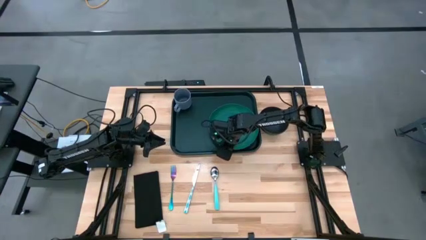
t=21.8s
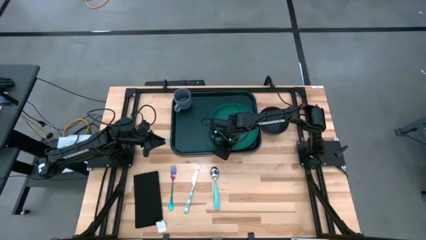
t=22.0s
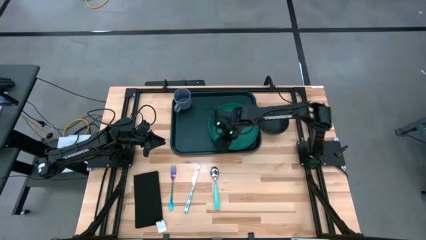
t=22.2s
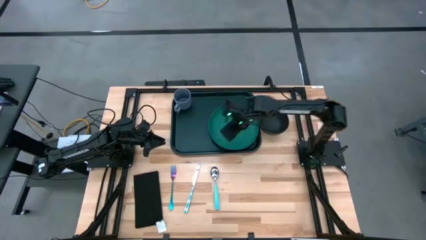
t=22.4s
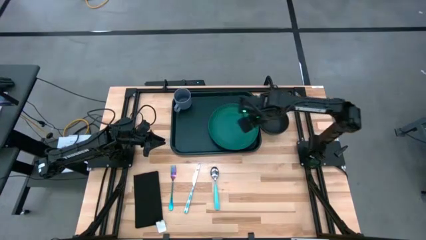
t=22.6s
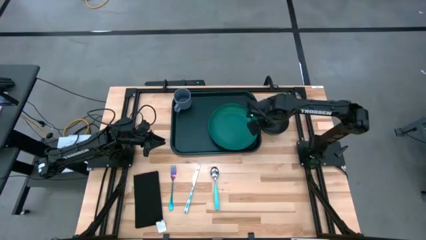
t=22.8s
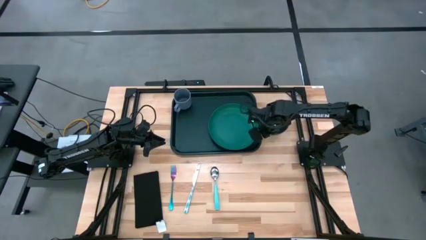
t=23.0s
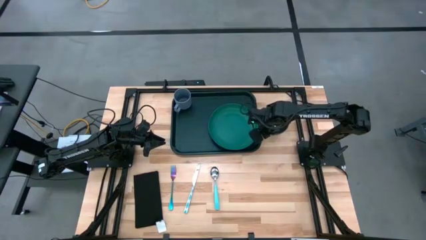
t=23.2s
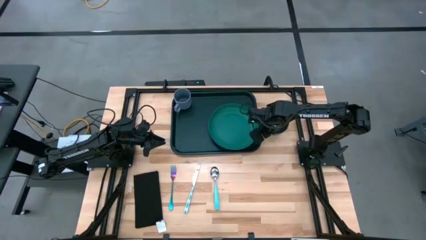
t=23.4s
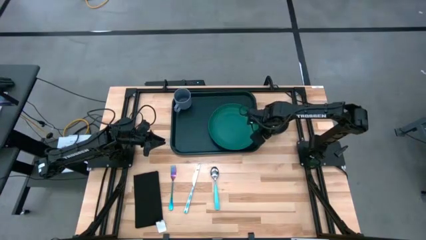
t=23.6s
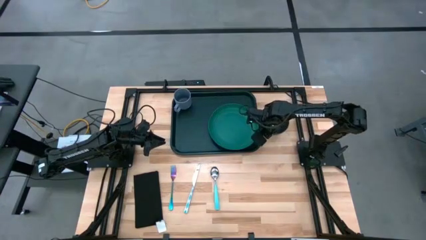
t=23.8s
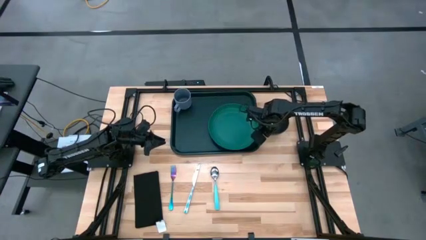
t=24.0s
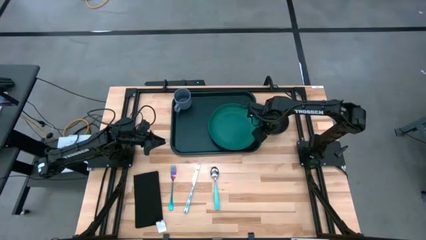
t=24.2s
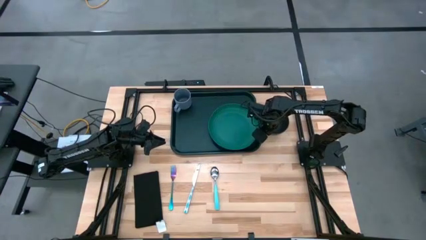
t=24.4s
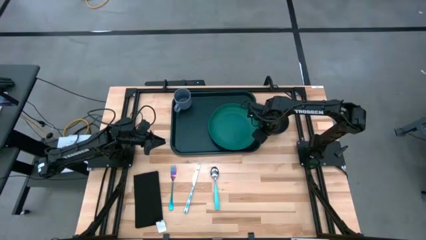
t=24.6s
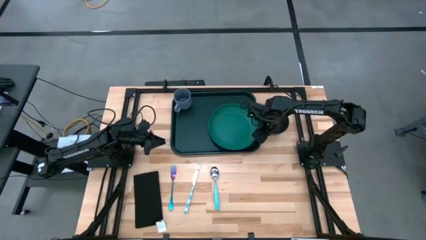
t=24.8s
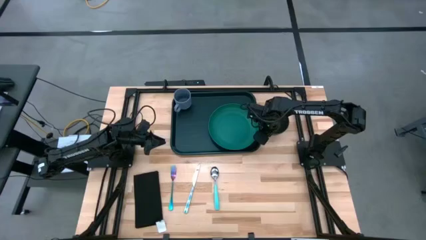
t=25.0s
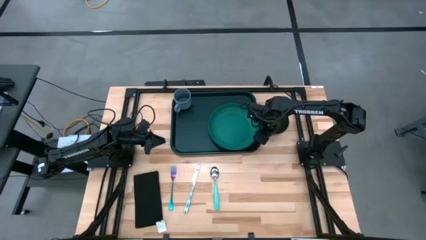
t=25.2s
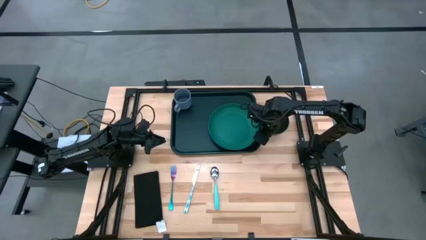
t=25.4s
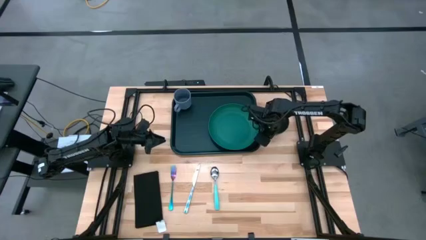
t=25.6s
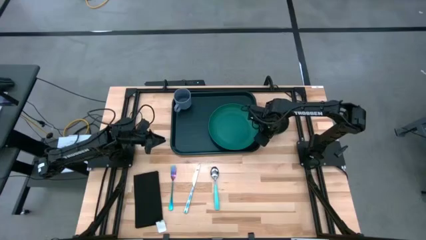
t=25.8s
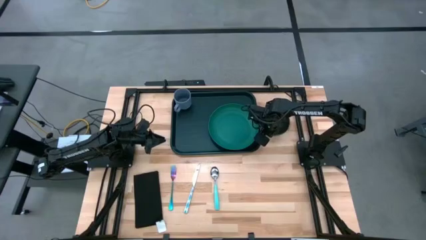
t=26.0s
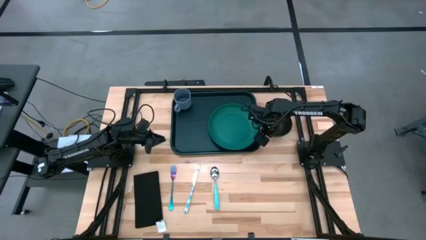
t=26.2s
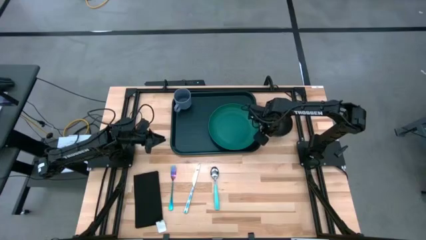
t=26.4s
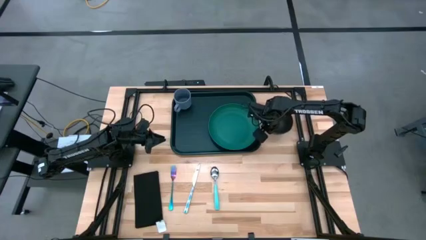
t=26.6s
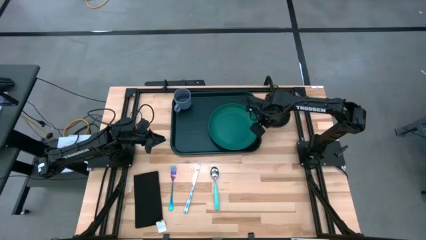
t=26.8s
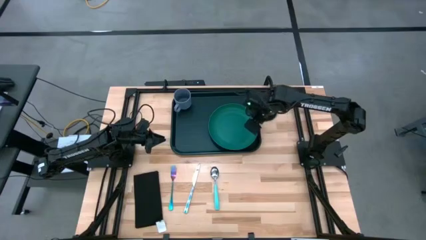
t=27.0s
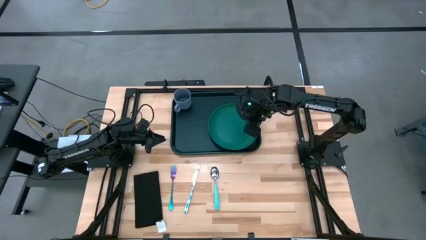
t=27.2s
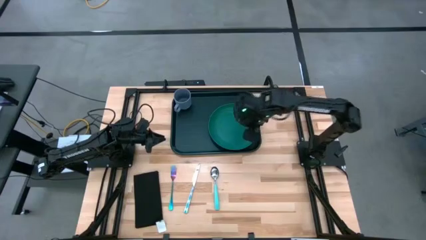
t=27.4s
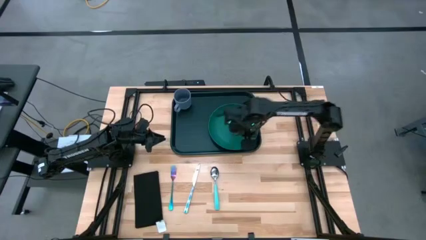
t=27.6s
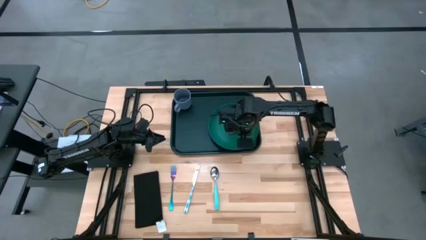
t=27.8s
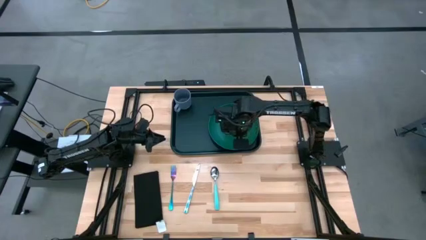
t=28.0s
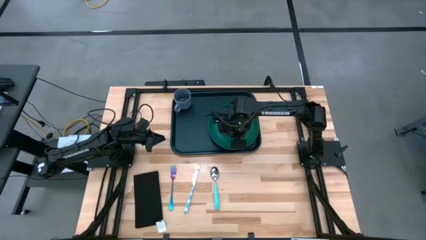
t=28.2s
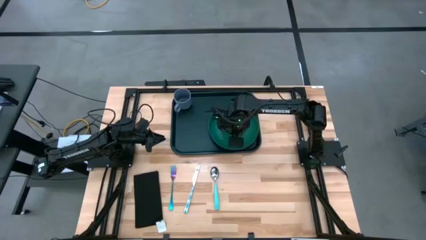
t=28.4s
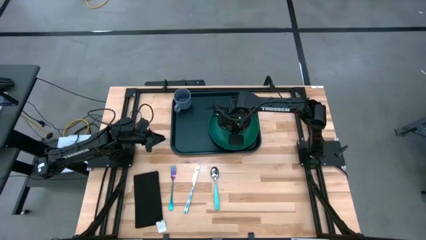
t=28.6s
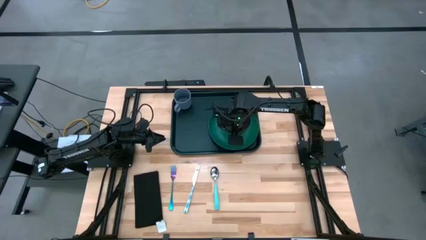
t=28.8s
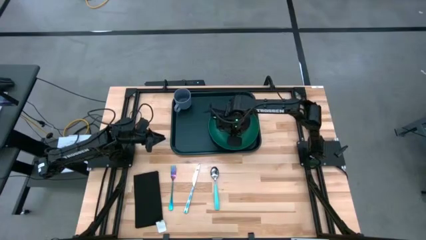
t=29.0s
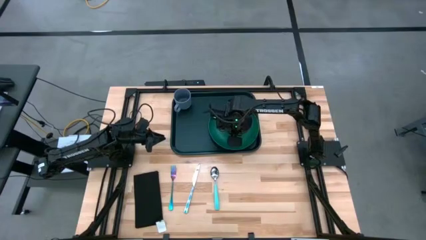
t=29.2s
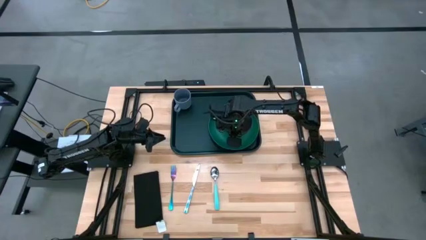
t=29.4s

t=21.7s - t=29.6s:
Task: Set up tray
Put the black bowl on the green plate on the black tray

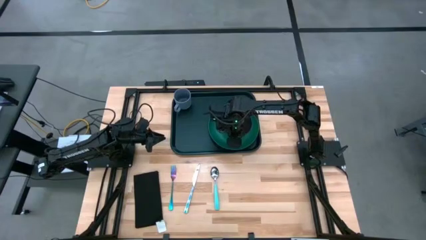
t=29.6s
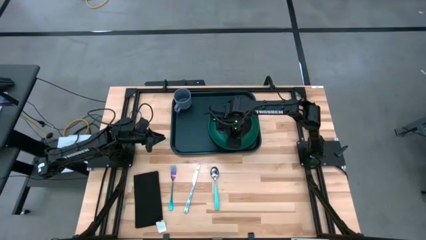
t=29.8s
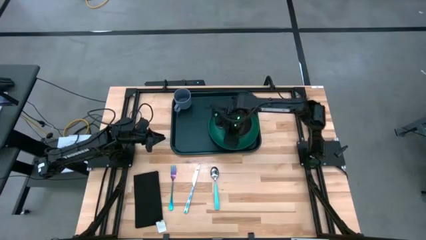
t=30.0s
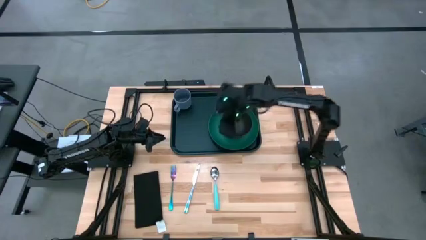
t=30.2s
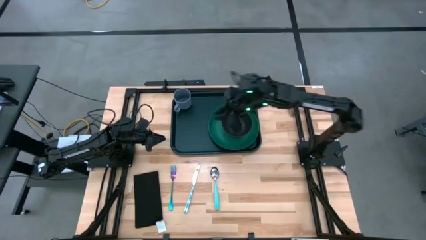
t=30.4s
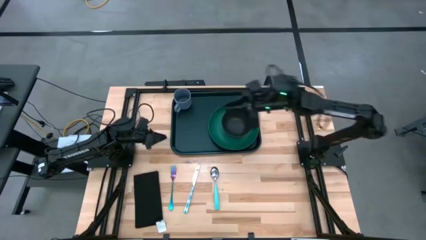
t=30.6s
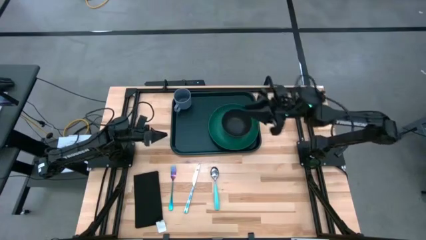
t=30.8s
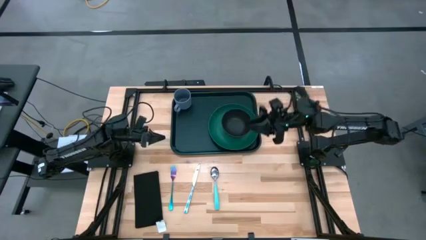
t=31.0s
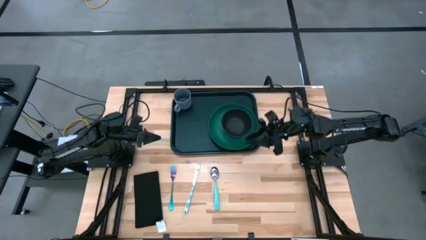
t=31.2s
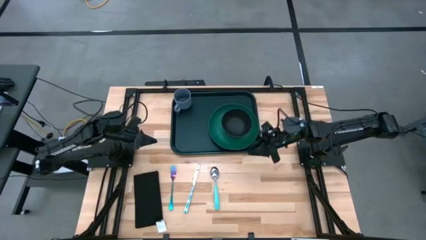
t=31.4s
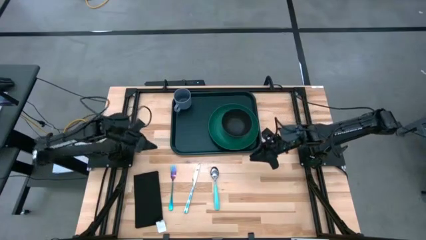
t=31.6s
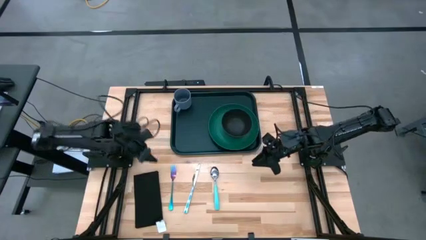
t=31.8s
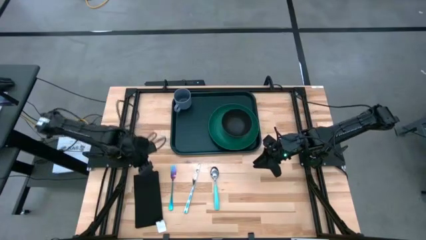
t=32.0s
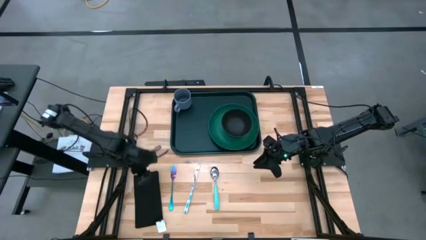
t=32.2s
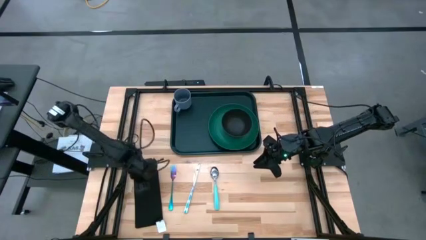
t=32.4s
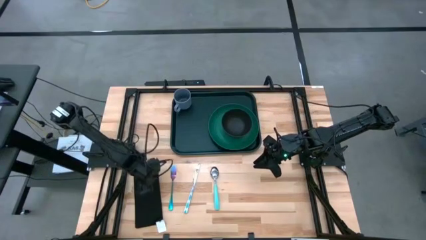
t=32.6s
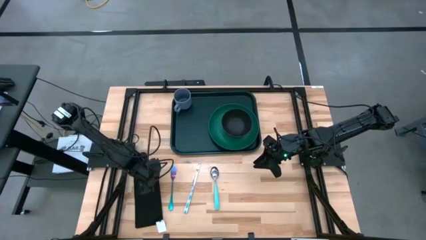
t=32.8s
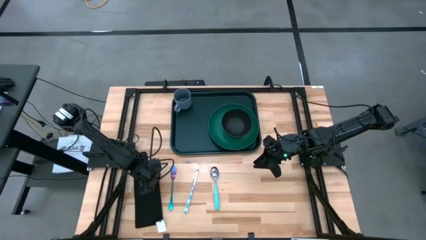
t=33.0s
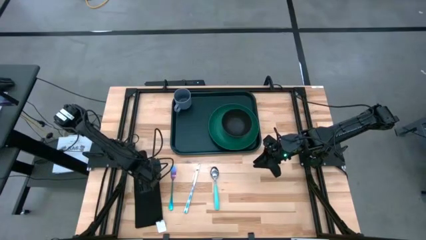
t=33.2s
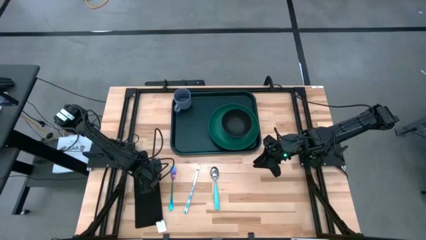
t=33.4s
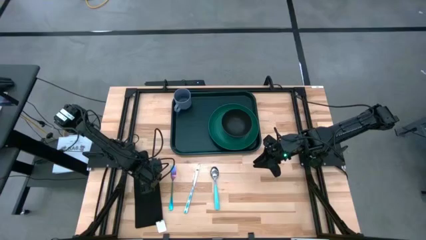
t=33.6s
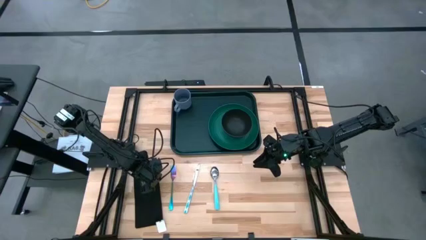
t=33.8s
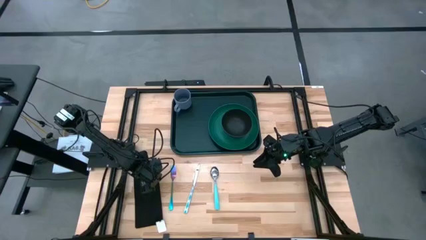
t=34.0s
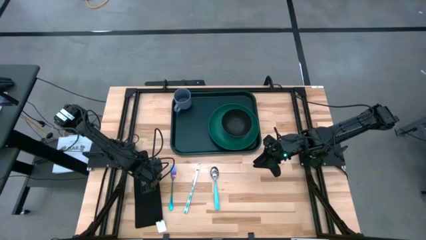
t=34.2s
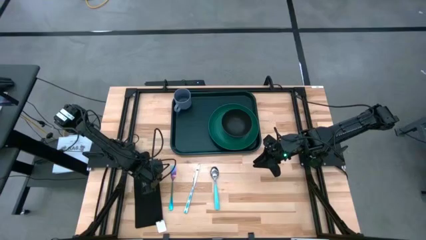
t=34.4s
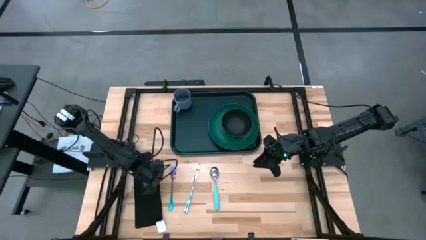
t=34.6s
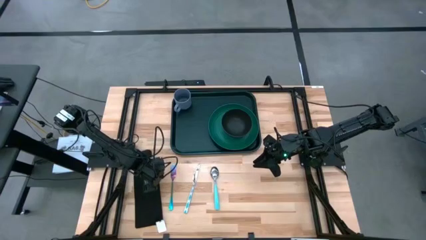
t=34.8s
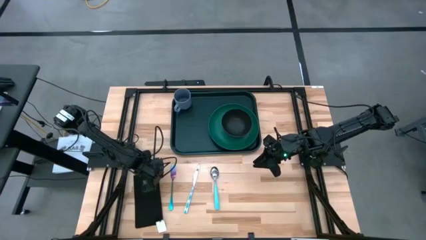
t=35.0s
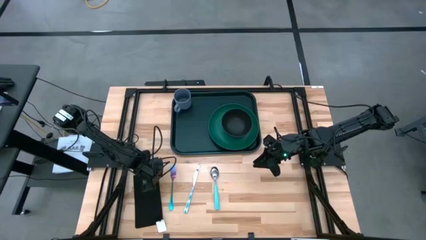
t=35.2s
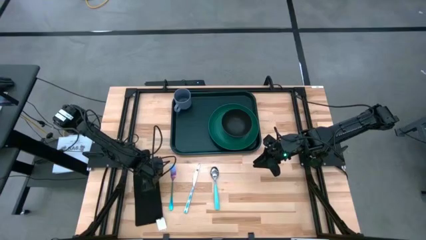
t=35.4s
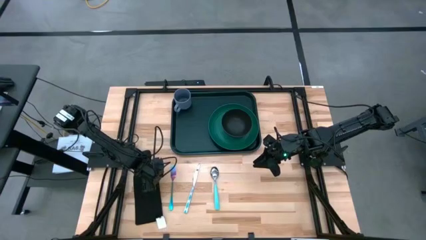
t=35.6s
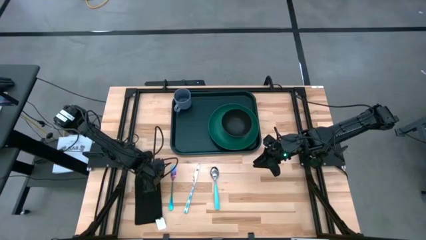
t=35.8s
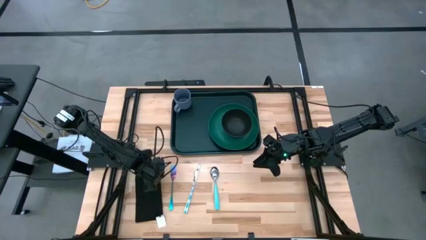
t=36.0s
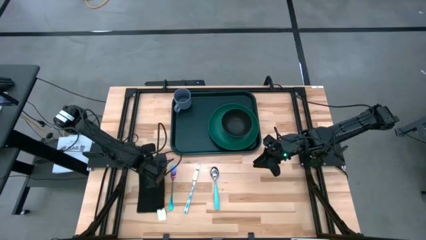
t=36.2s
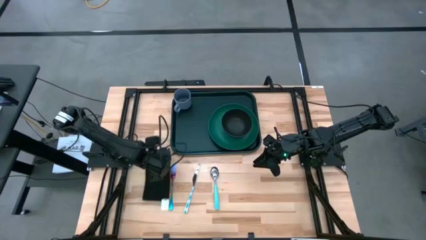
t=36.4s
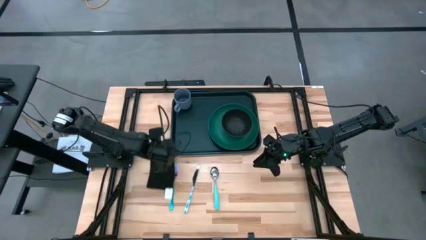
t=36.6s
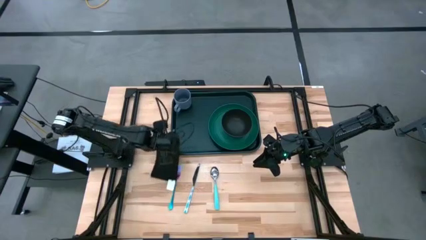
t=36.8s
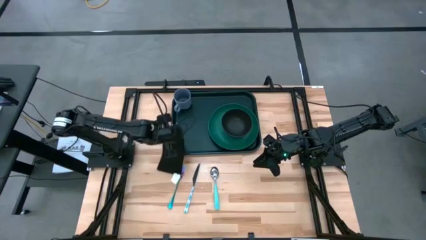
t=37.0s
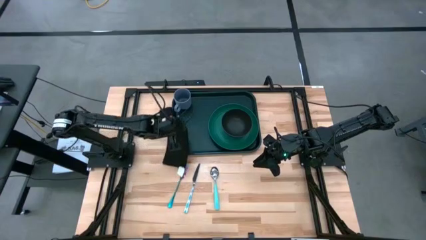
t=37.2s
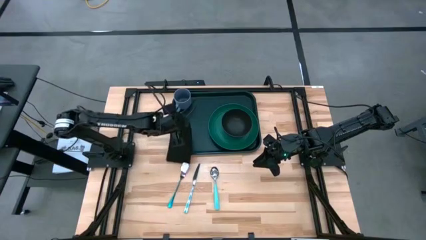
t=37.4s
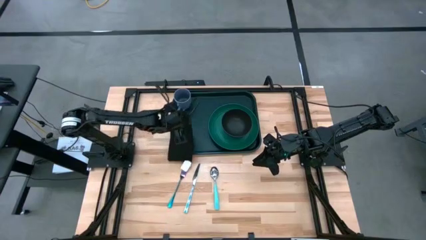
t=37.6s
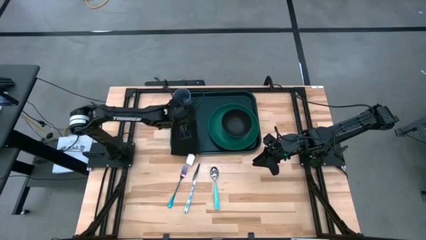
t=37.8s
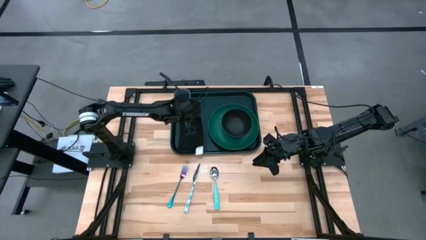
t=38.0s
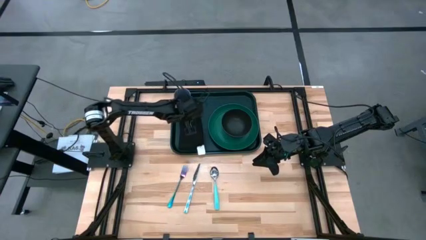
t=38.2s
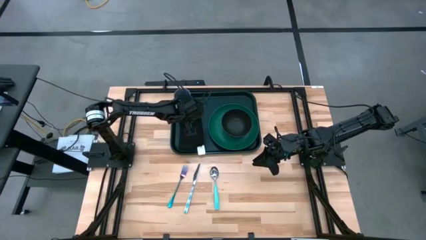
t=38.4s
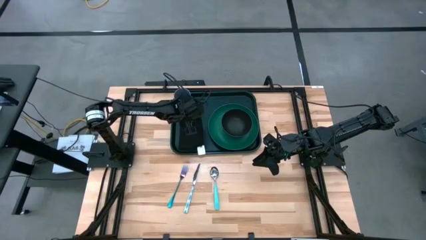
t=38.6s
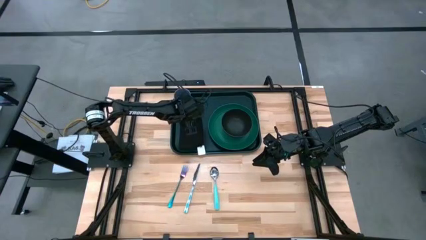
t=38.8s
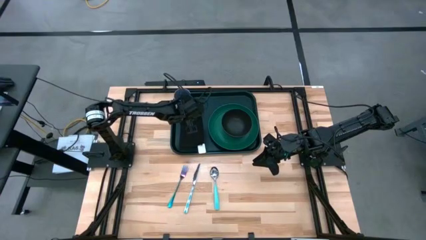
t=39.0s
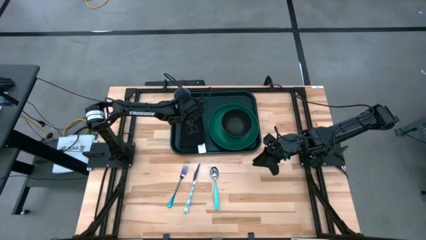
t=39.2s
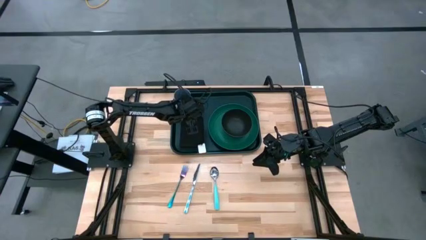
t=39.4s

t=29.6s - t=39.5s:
Put the black napkin on the left side of the green plate on the black tray
